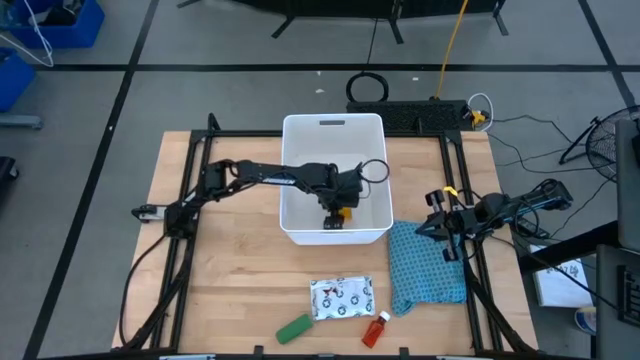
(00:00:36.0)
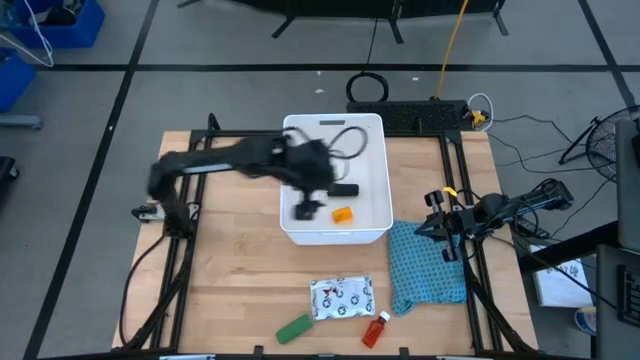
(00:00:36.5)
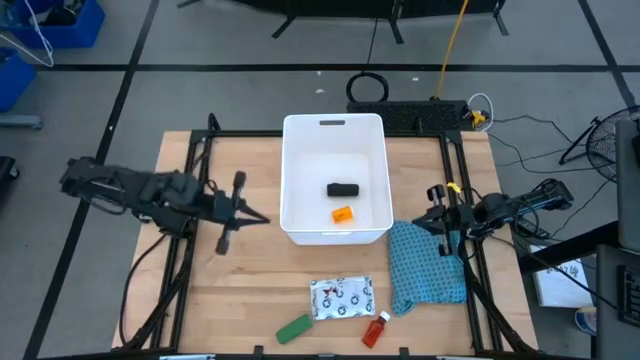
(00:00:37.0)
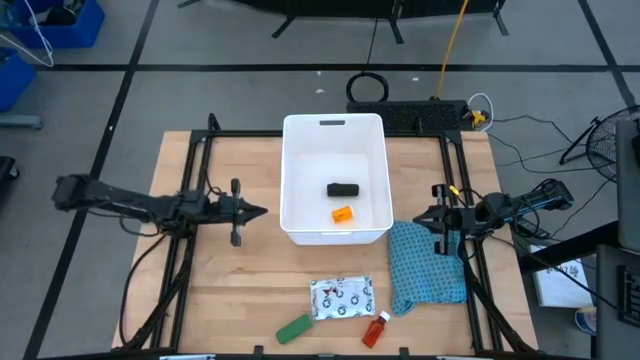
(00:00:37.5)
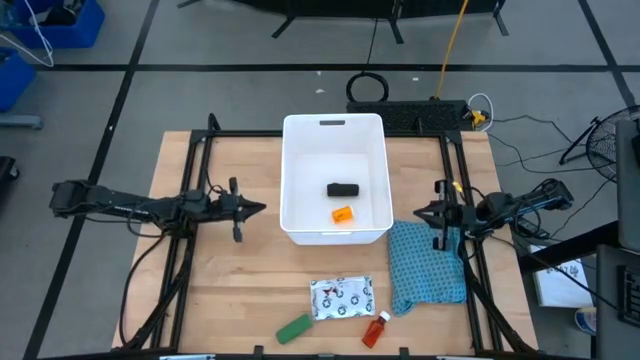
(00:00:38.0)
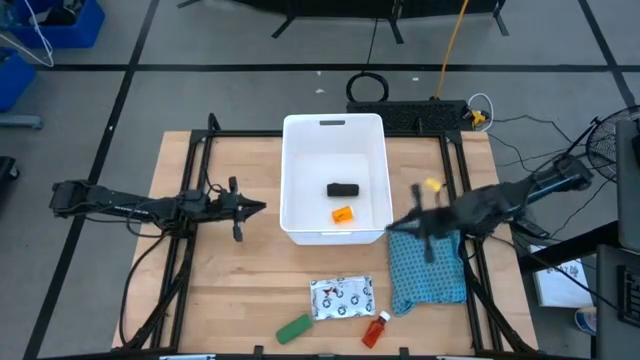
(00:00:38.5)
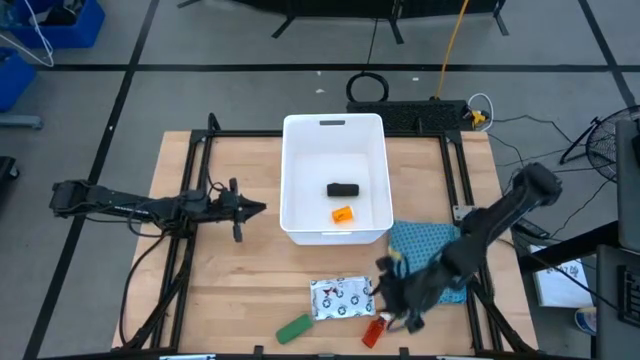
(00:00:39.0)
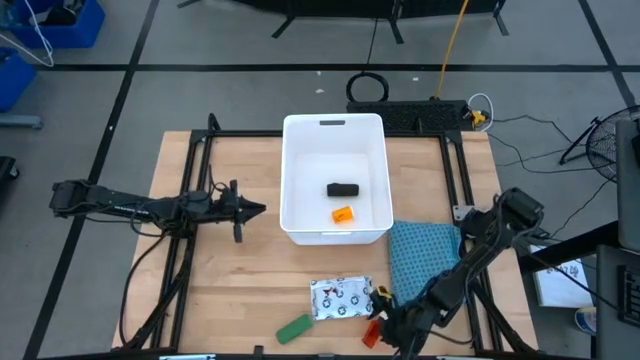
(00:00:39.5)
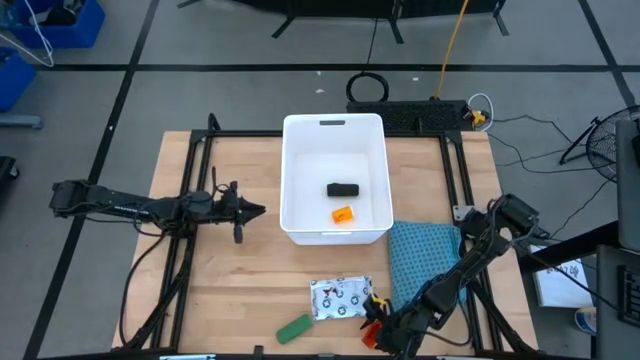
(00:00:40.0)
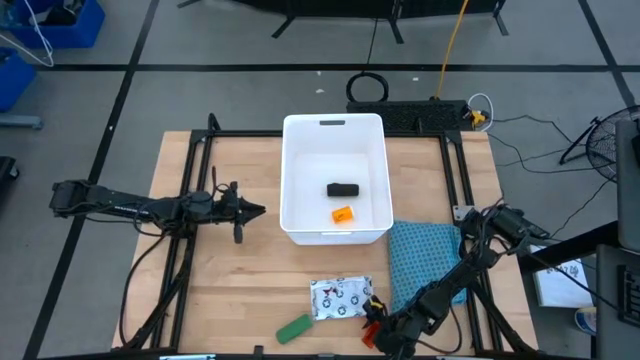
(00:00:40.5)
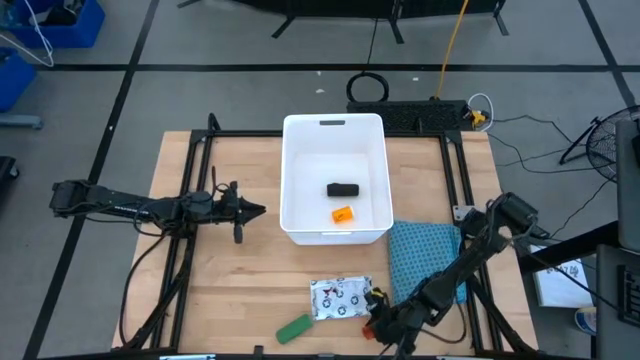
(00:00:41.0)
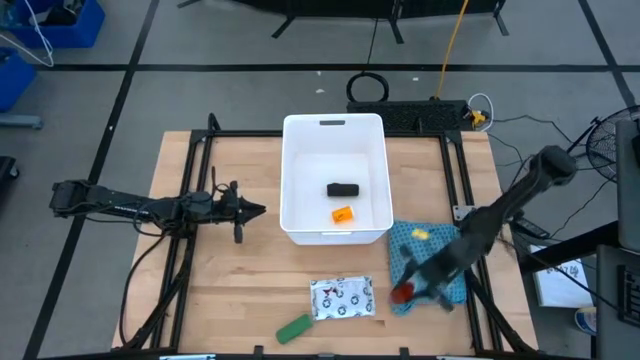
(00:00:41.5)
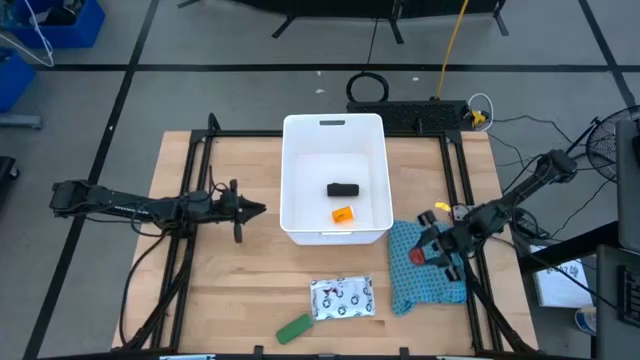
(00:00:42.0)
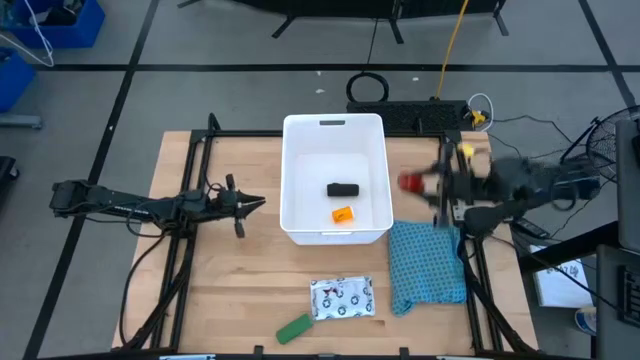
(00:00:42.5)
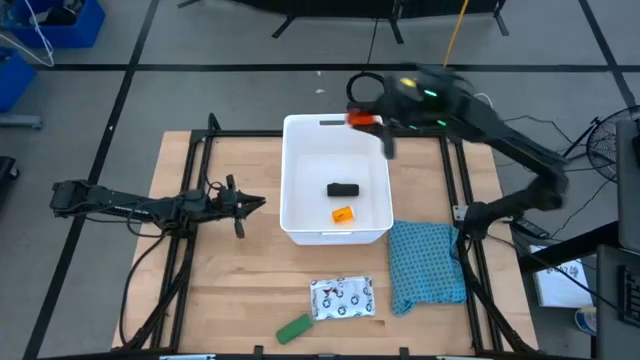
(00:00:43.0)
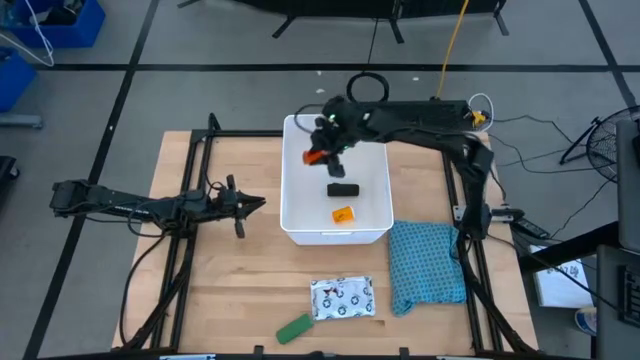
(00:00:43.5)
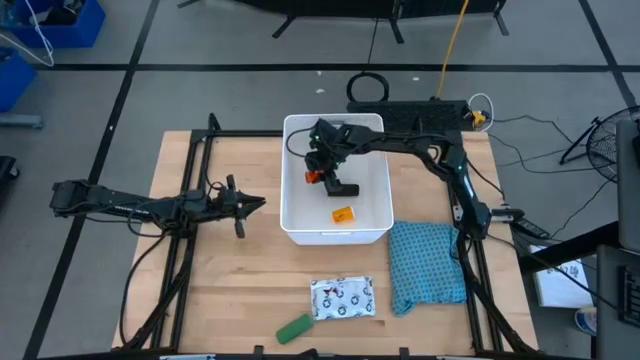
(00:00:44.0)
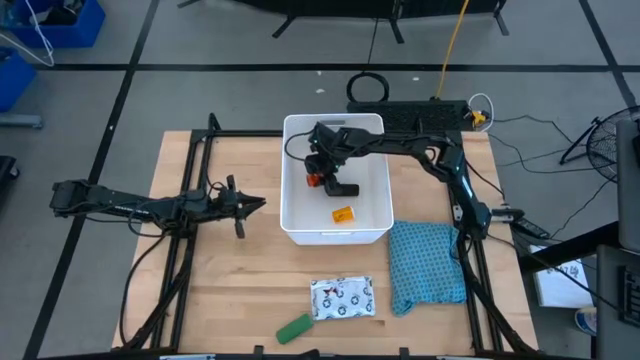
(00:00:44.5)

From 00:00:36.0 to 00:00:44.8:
Task: Pick & place medical supplies in basket/bin
Put the red bottle into the white bin

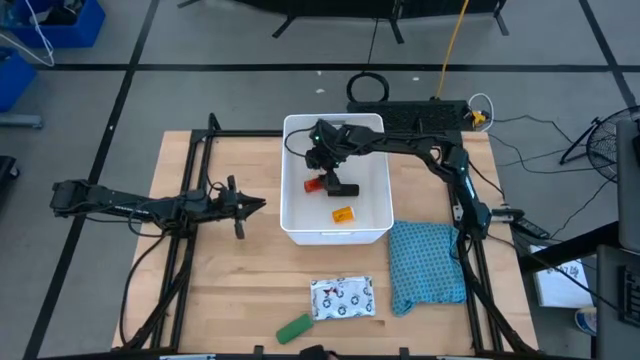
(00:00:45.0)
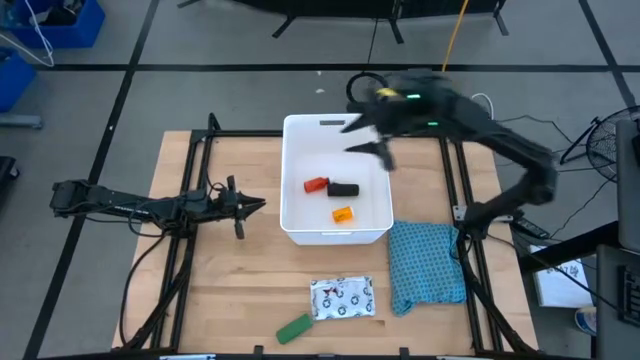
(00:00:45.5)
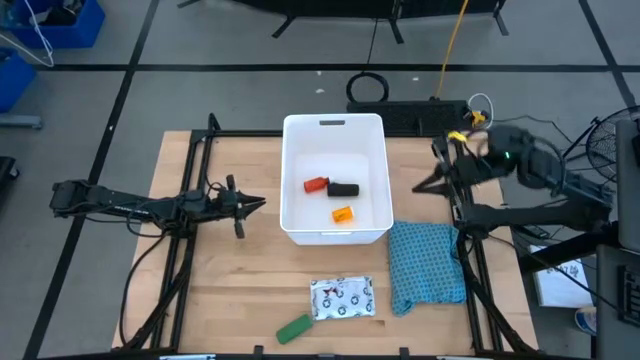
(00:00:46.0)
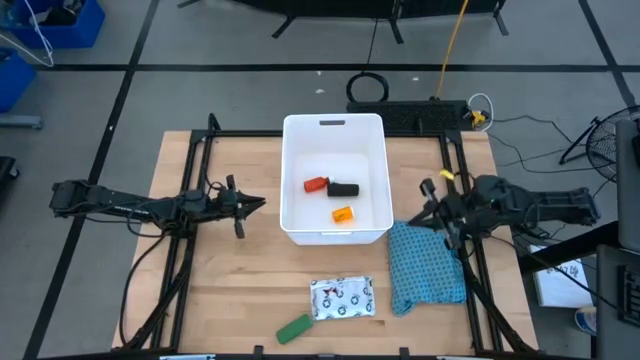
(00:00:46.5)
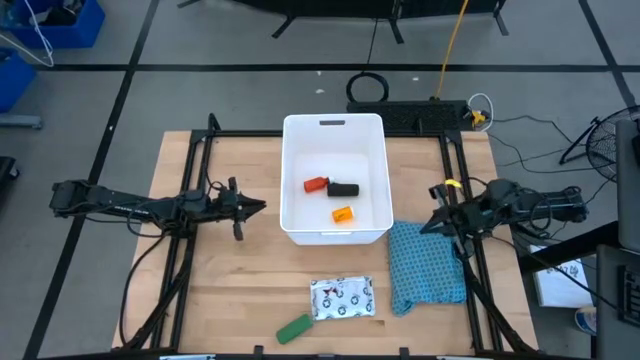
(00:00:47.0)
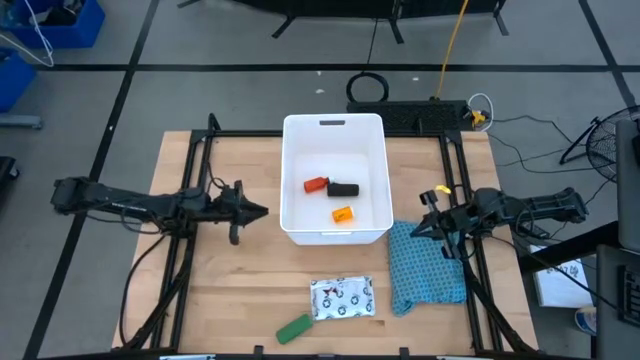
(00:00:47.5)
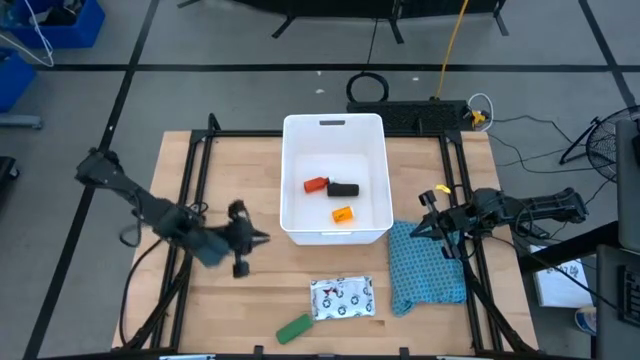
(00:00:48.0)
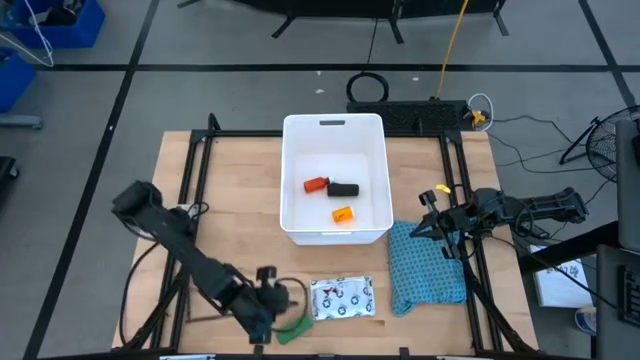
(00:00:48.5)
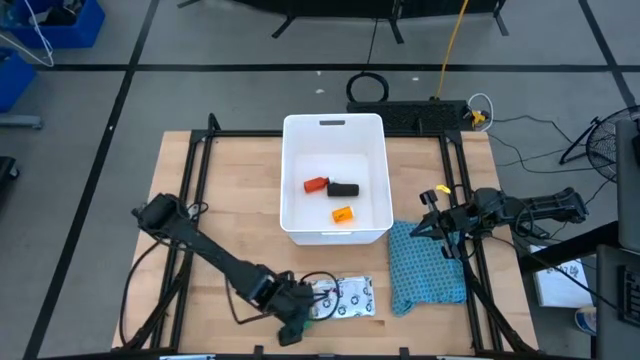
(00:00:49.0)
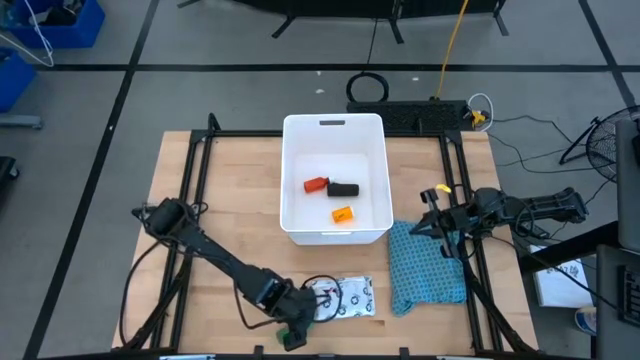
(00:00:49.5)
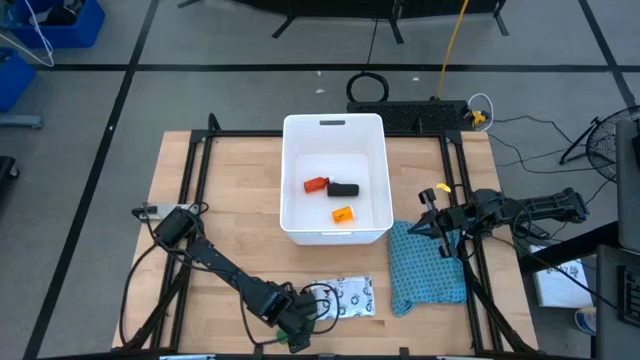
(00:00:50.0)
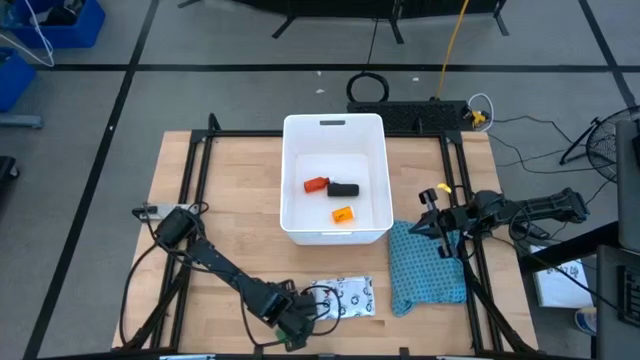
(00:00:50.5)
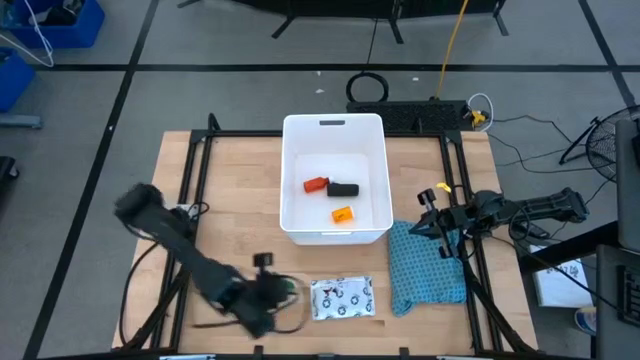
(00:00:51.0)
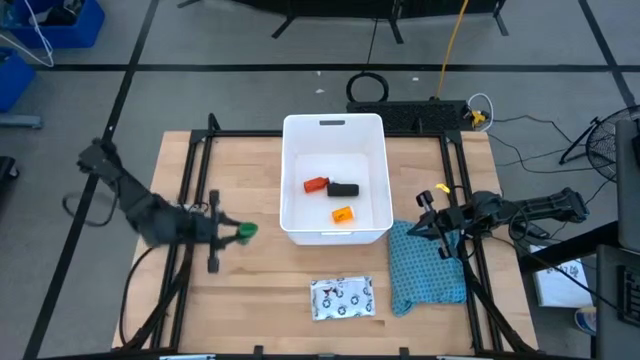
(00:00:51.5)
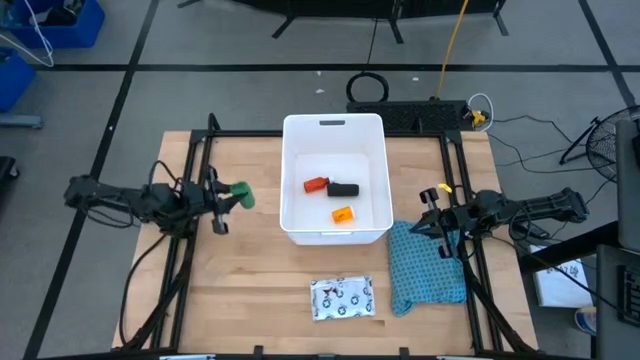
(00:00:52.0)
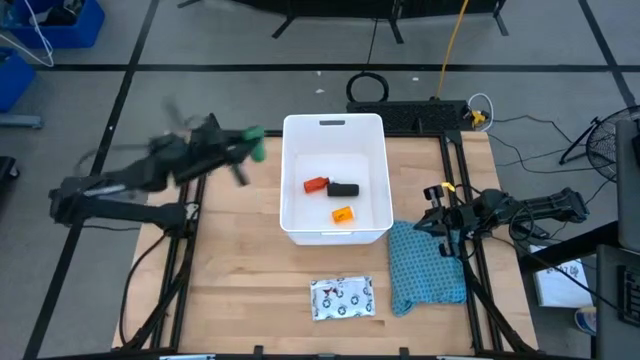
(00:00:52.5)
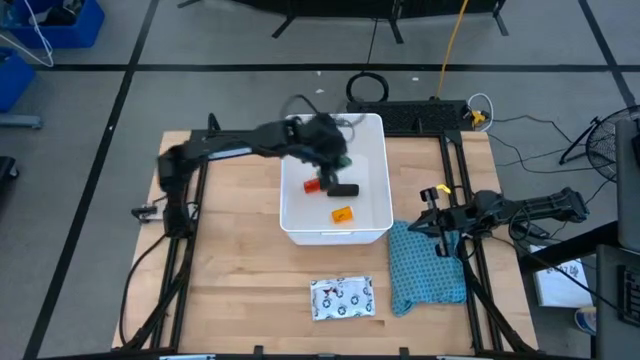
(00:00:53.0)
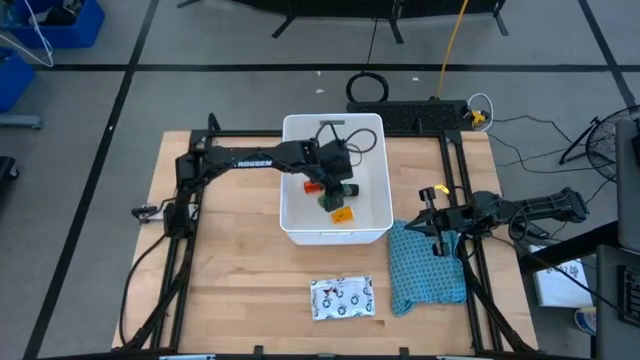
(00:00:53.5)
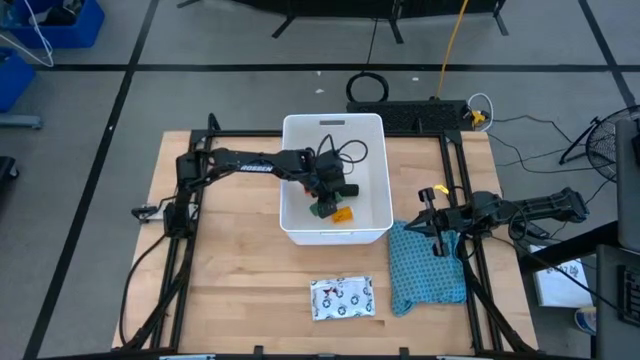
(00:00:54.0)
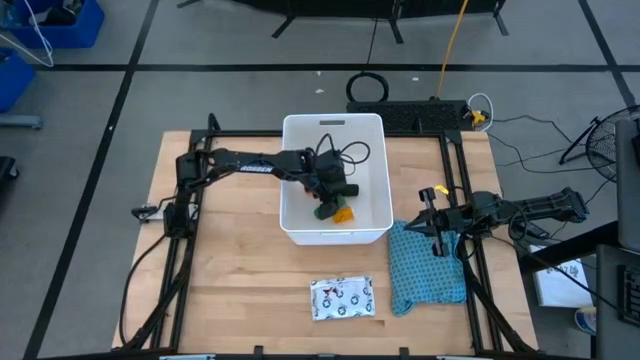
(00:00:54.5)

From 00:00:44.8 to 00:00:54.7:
Put the green bandage into the white bin

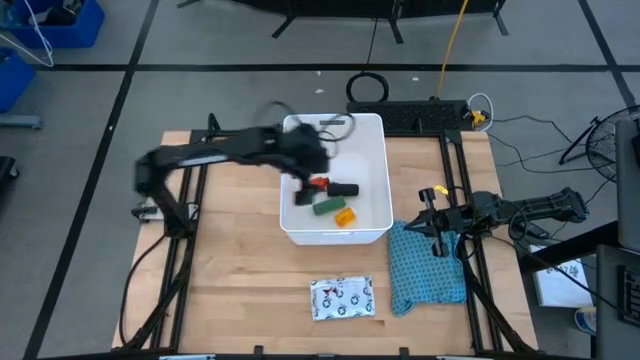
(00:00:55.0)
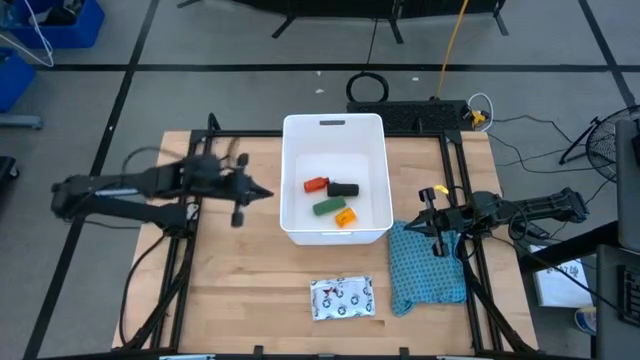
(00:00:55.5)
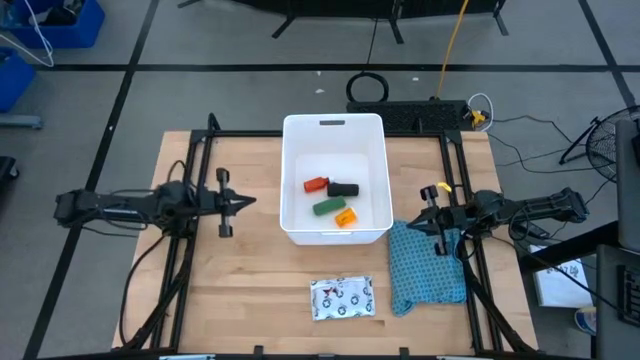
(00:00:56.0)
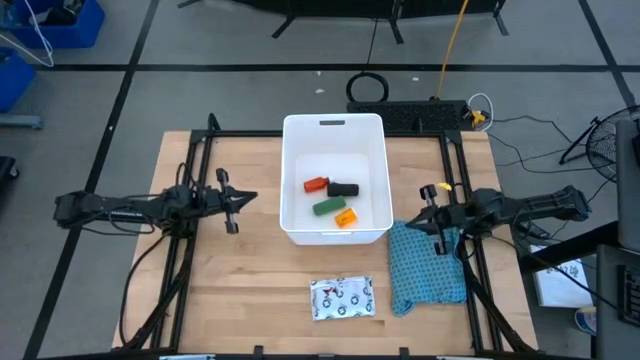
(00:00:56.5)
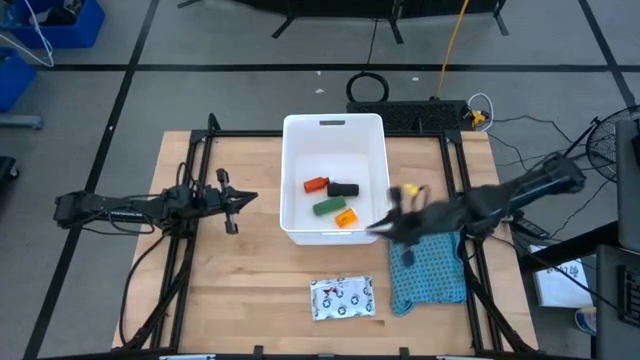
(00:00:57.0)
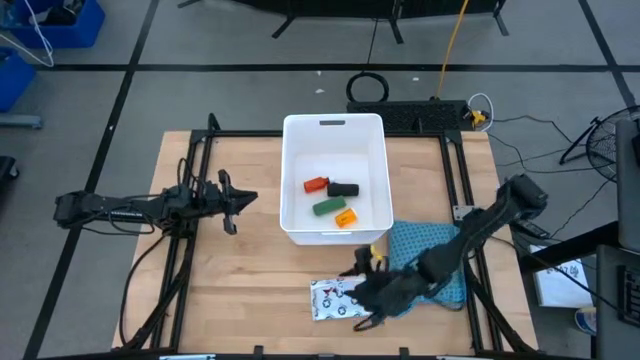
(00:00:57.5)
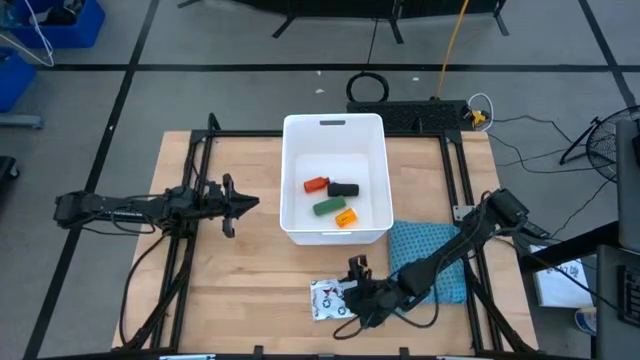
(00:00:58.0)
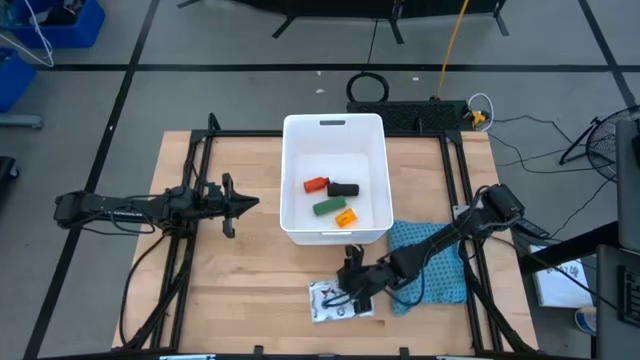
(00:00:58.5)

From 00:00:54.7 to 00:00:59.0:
Put the white mailer bag into the white bin
